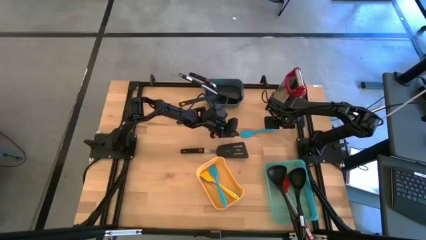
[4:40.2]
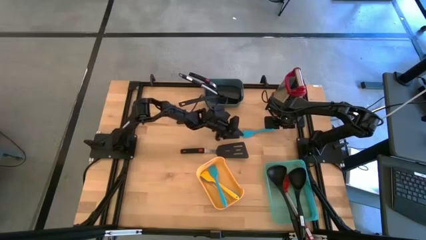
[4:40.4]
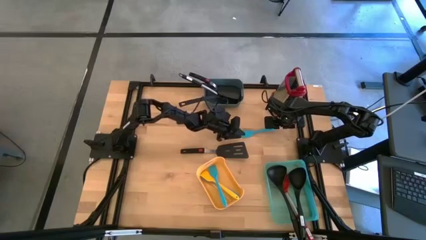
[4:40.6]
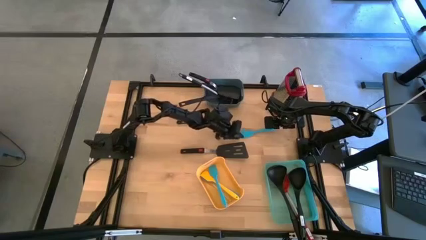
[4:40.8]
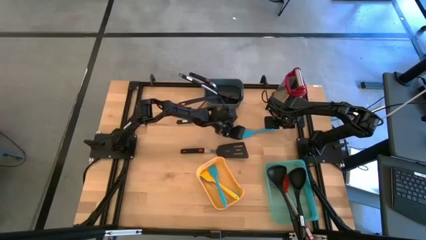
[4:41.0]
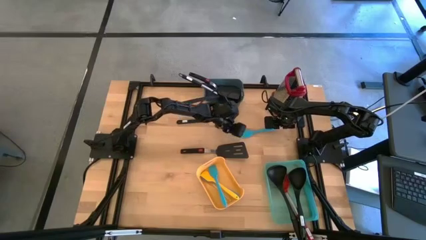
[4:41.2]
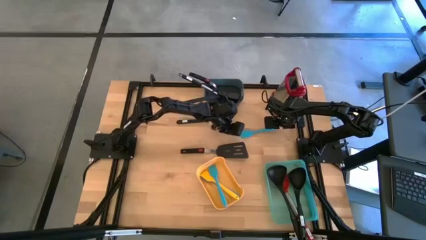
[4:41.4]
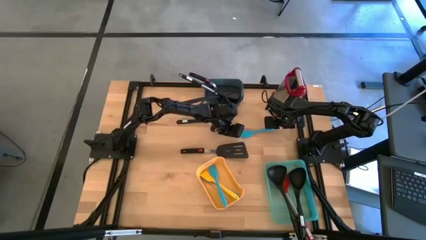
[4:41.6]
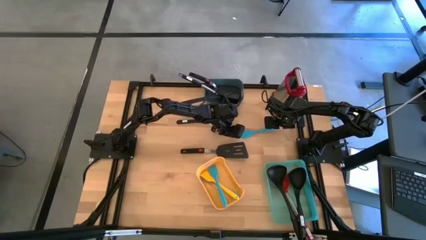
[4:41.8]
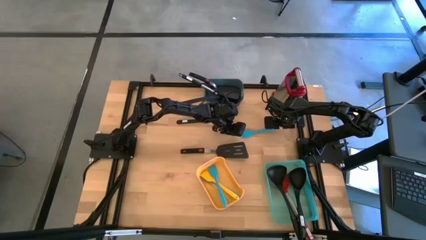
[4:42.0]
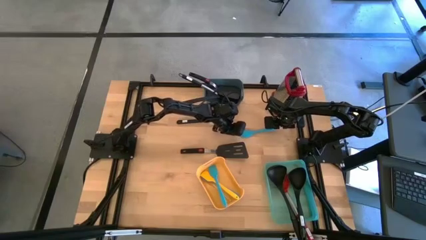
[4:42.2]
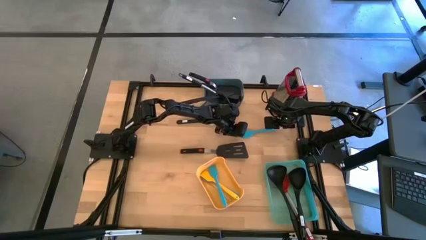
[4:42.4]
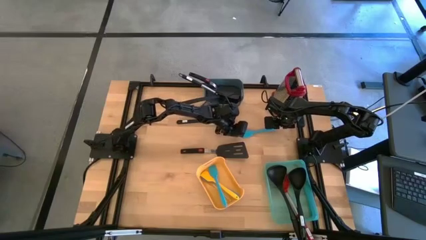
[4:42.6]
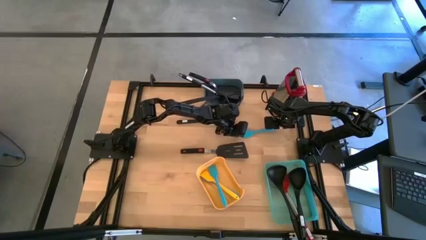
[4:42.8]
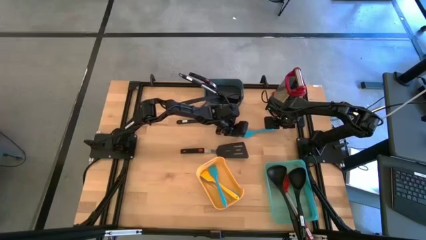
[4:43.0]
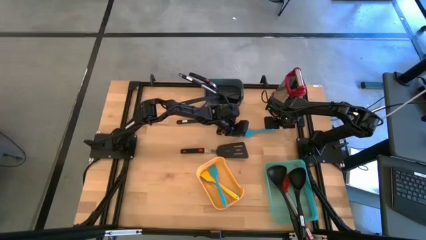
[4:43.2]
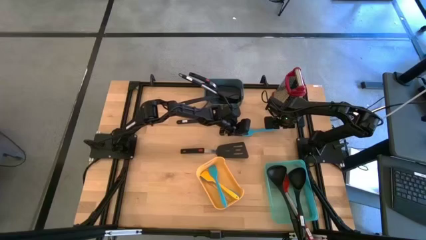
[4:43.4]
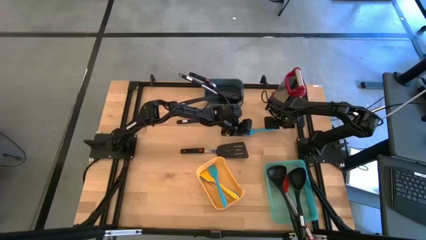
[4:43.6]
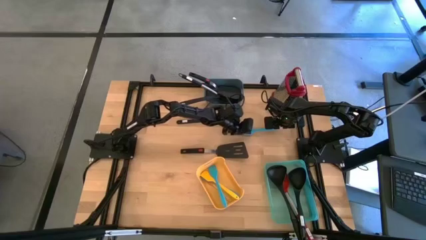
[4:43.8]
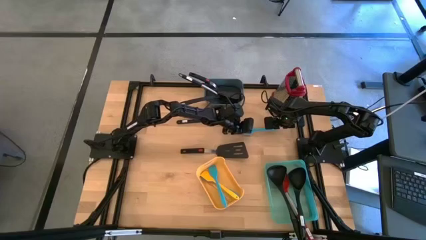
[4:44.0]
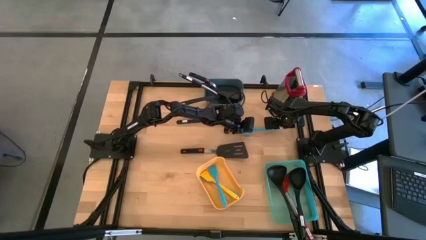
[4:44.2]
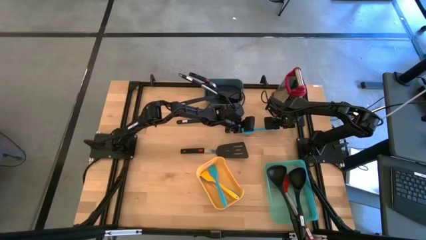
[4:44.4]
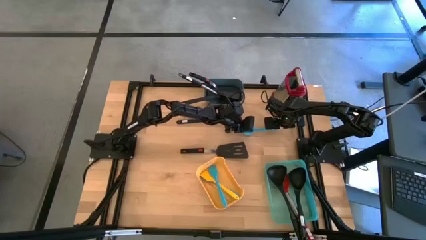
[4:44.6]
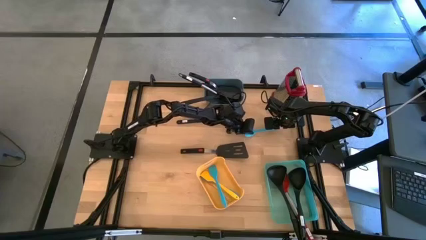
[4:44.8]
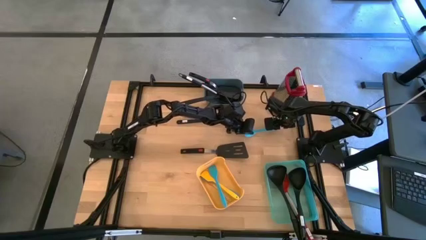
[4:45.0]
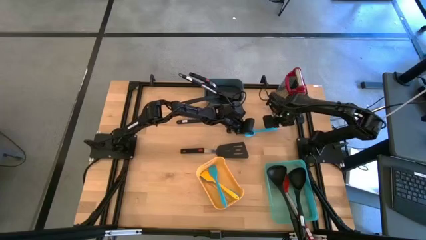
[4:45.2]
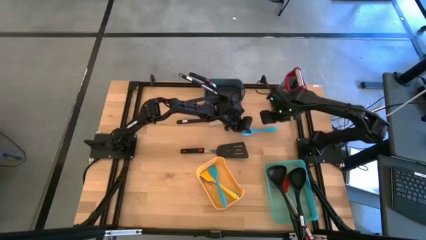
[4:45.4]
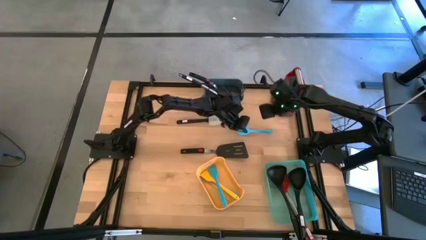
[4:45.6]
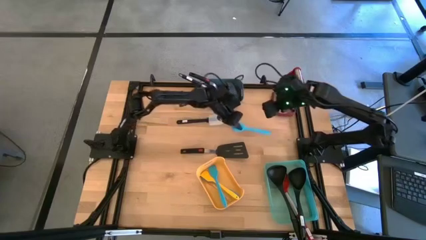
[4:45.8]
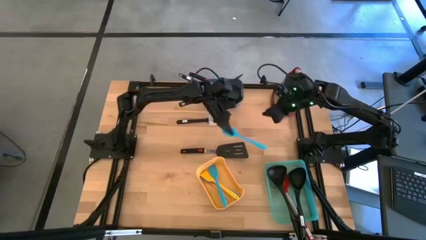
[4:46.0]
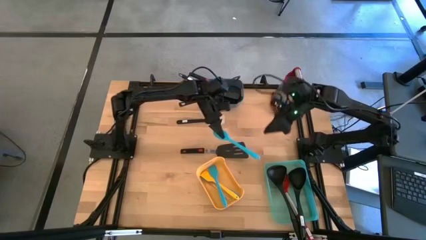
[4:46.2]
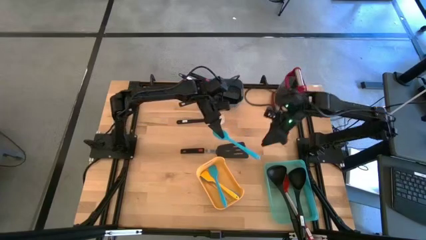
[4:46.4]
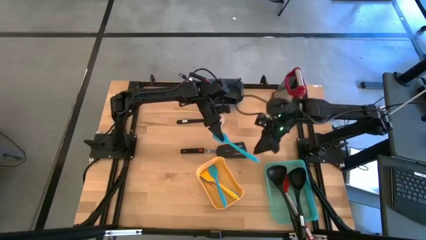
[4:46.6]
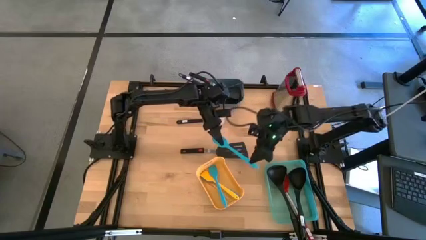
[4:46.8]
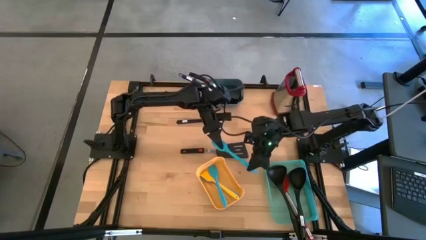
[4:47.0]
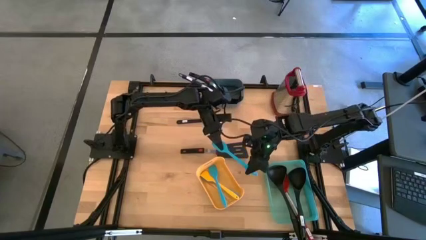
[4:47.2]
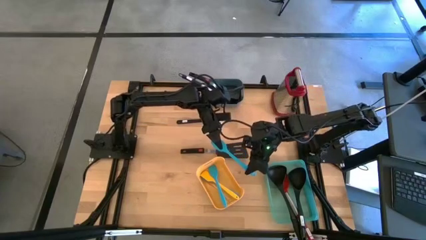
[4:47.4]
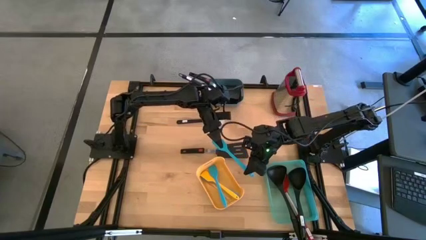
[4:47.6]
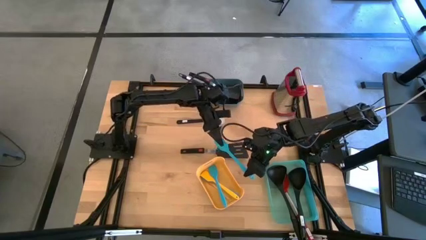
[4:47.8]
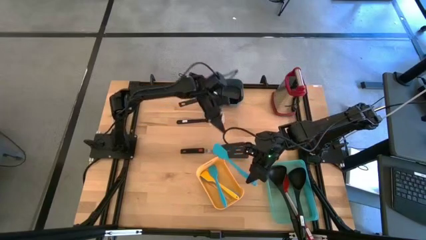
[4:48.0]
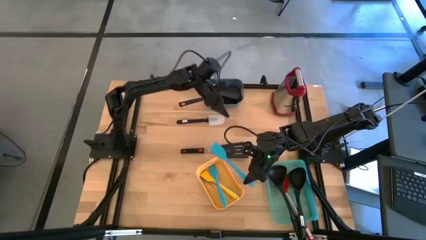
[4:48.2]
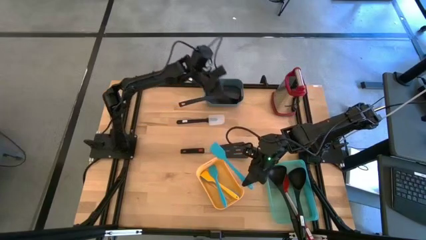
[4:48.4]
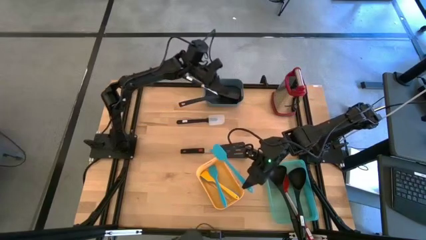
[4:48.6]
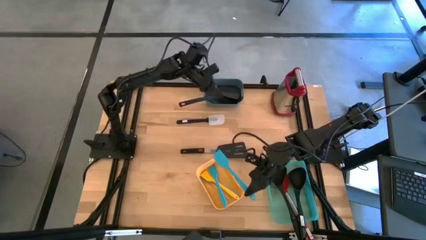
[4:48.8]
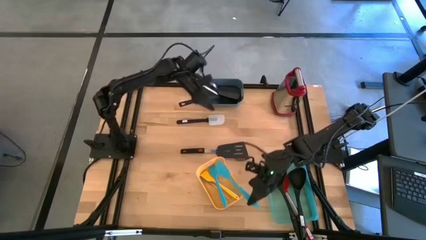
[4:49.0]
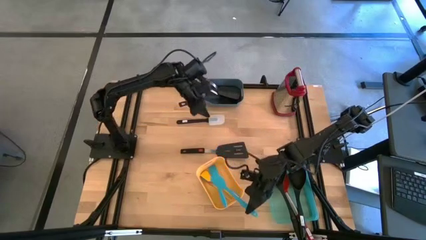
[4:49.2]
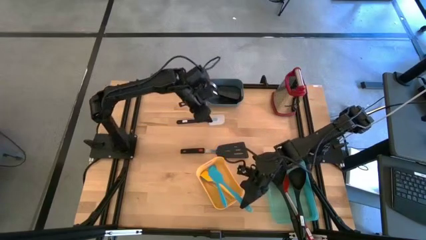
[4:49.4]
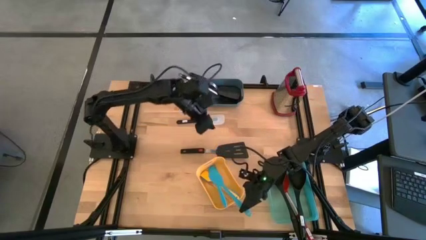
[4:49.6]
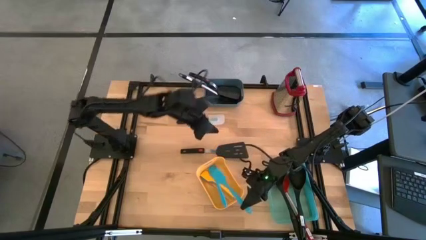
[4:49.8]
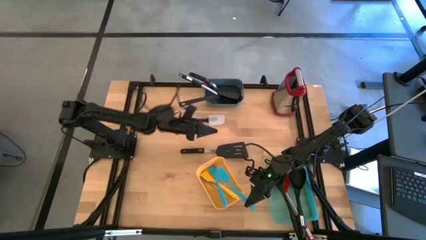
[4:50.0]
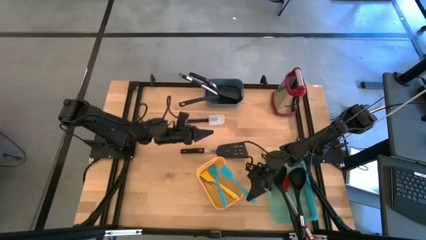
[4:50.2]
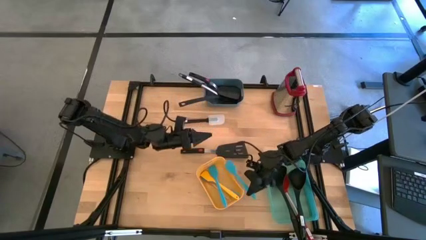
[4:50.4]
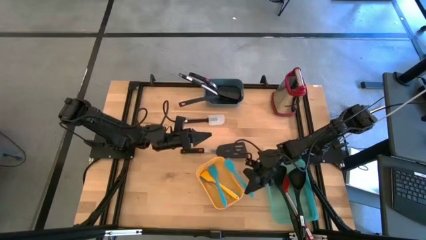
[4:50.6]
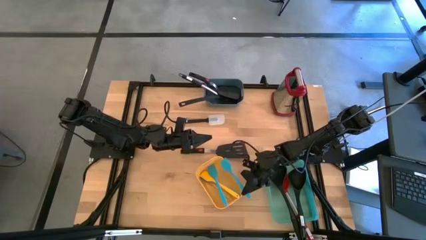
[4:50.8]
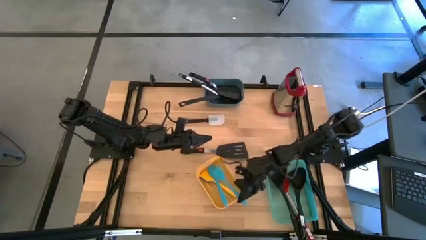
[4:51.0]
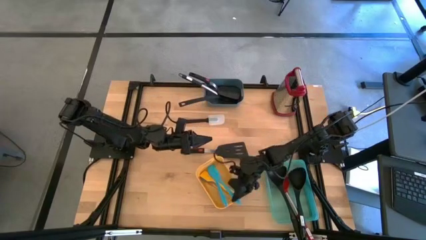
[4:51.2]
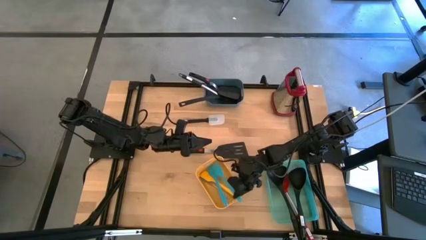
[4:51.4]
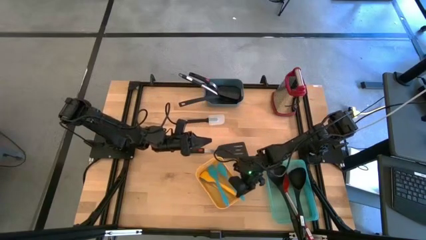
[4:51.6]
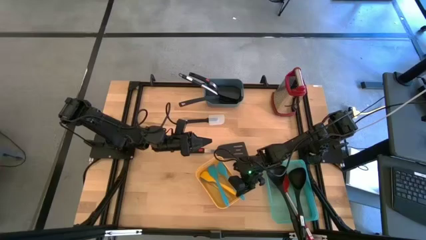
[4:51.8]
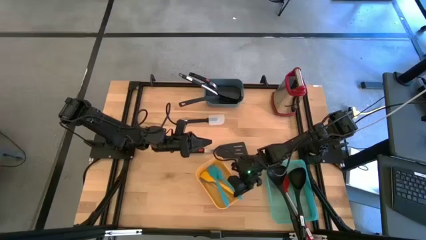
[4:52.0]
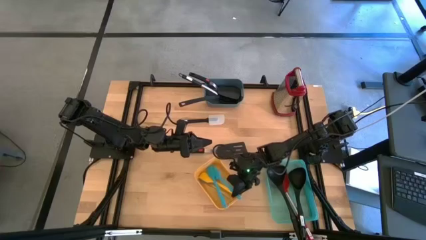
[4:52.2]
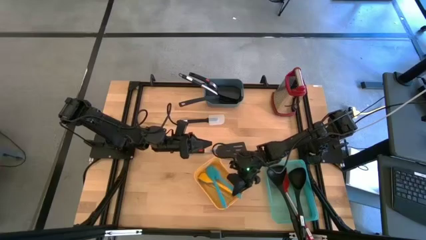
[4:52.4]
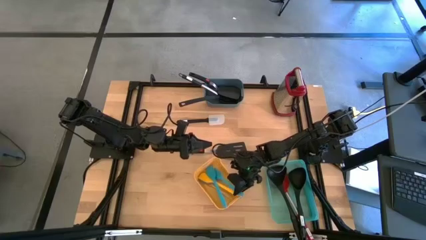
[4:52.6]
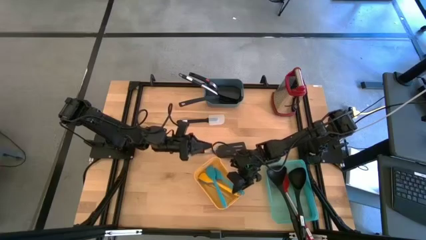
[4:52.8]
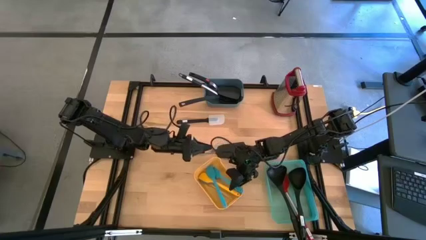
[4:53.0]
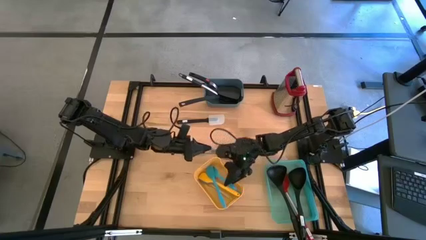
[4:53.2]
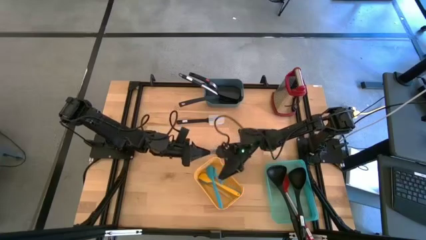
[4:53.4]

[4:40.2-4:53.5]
Task: Pick & Place Kitchen Items
Put the small blue spatula into the yellow bin

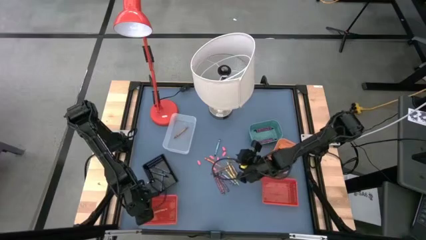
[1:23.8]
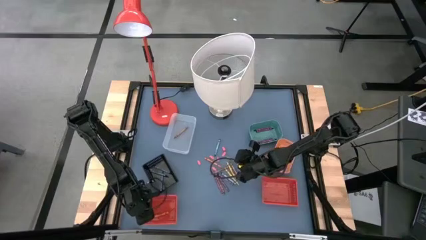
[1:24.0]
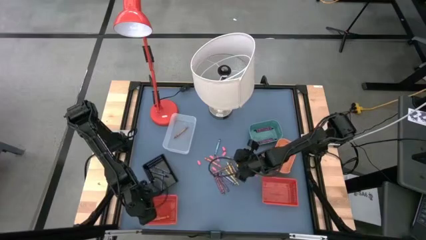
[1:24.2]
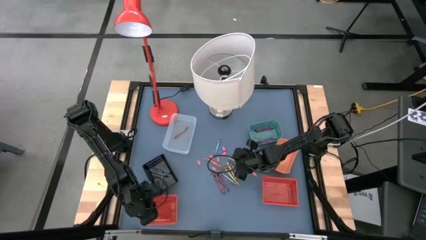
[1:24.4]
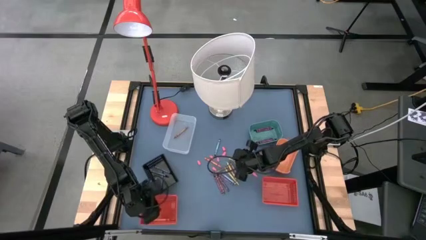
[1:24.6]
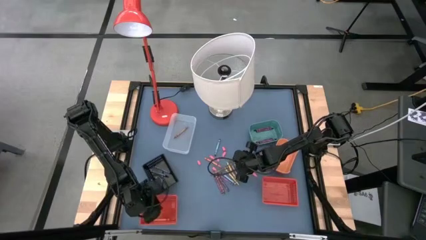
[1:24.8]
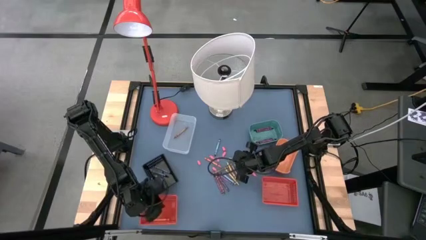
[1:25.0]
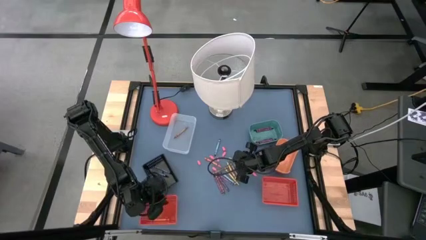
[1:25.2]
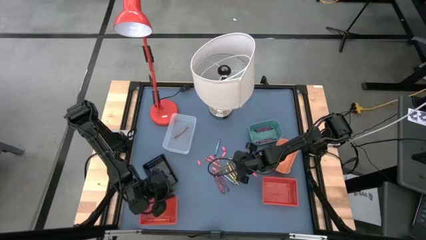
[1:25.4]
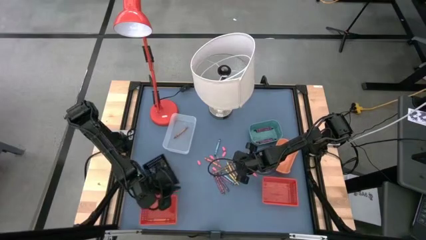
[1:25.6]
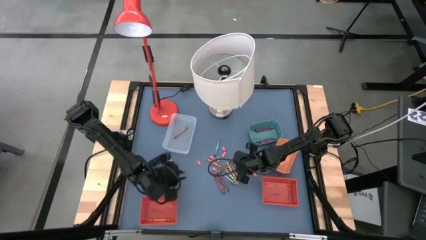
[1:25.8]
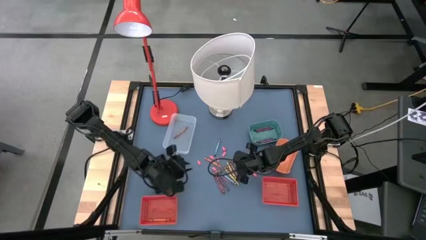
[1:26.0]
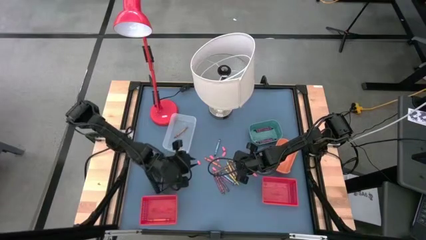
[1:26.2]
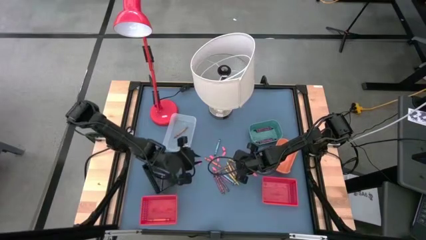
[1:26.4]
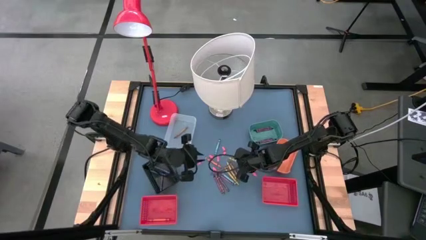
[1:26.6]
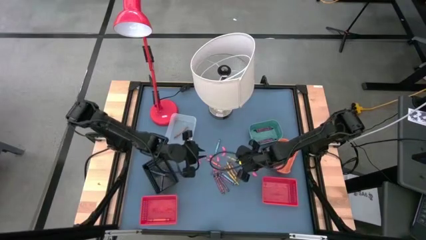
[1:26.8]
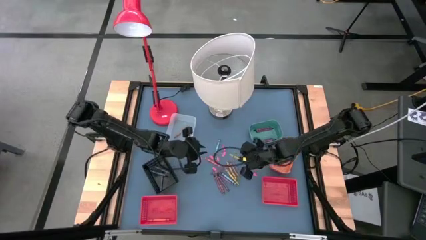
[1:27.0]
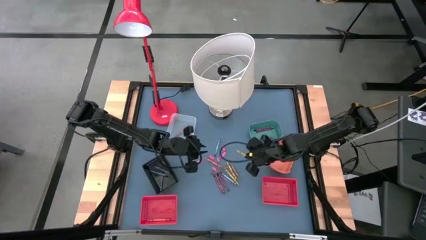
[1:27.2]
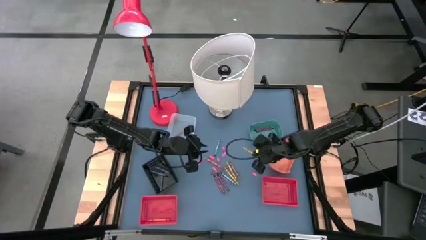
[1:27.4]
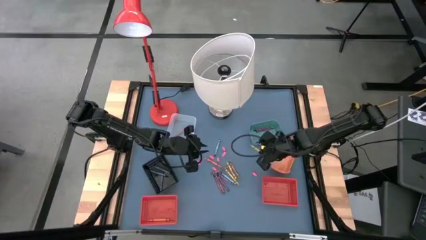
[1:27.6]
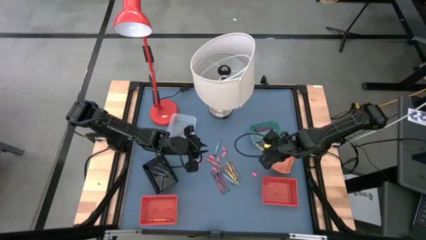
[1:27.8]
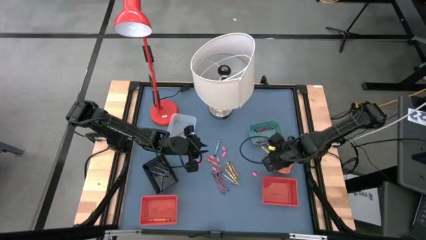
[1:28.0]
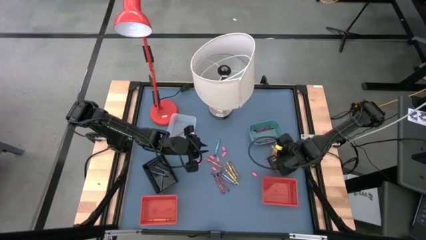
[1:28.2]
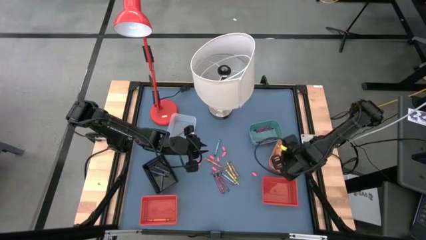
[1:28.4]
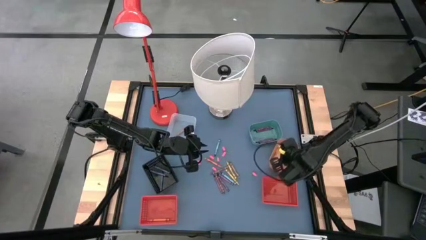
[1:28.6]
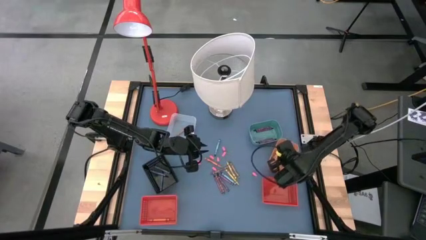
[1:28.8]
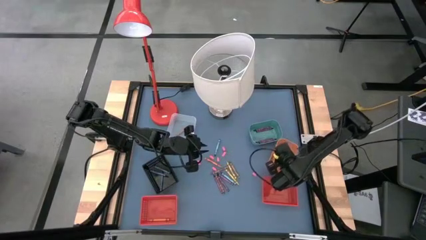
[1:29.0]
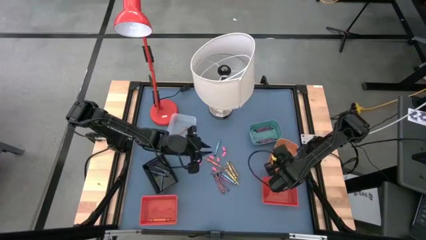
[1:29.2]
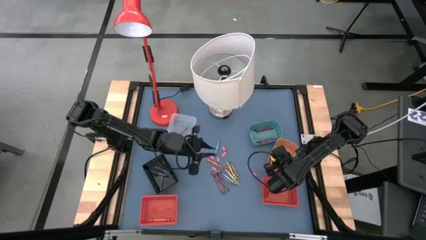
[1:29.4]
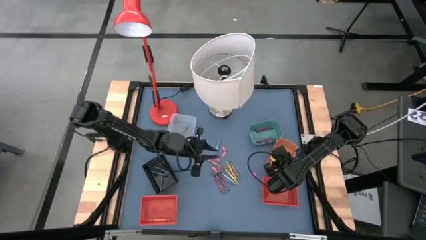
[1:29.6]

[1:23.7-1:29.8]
Task: Sort crayons
Put the yellow crayon into the orange bin
